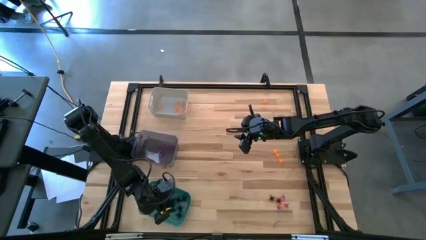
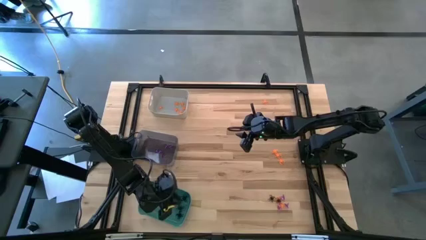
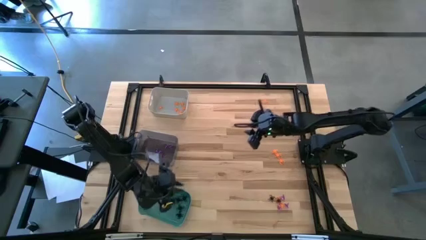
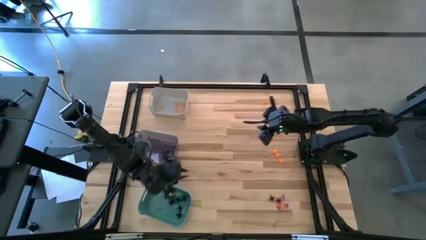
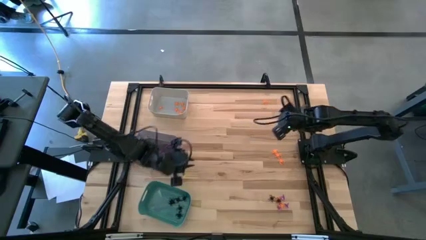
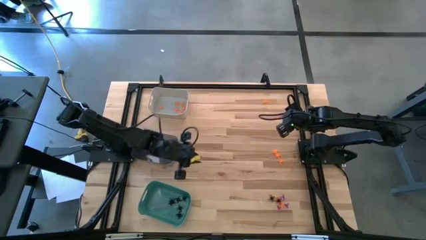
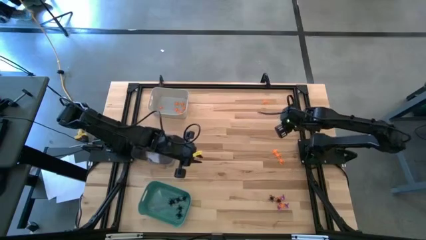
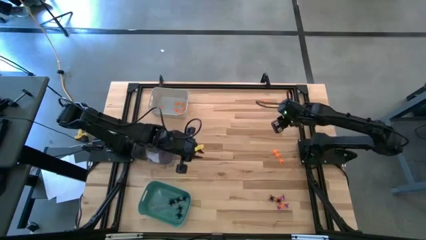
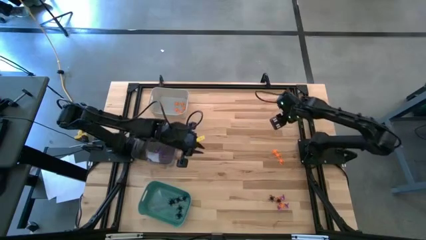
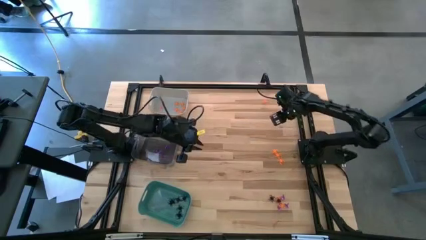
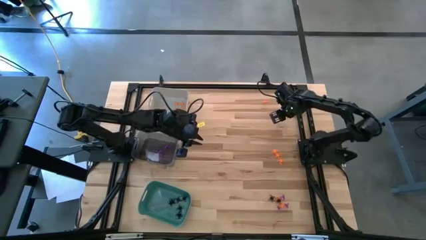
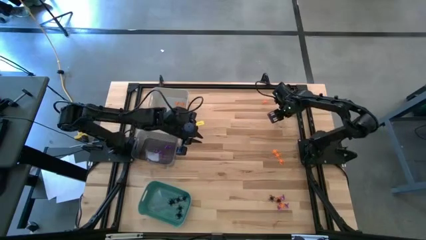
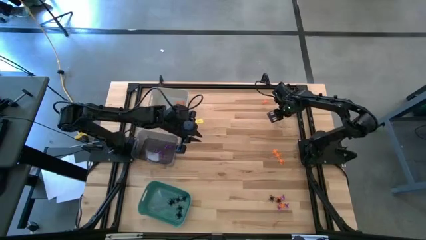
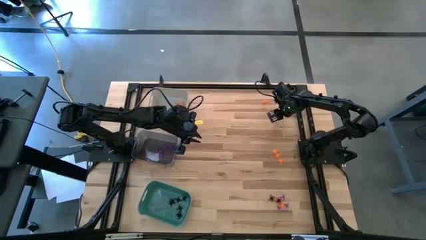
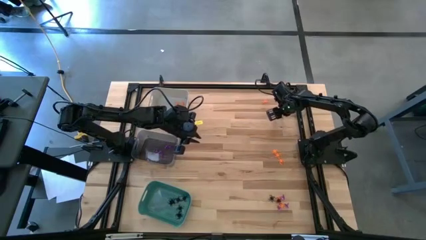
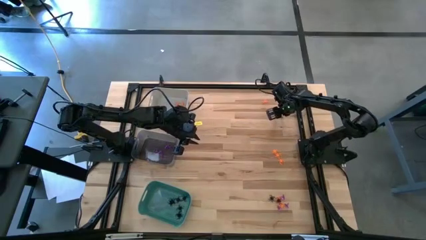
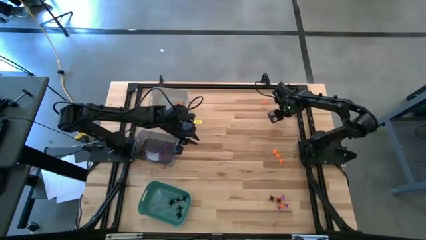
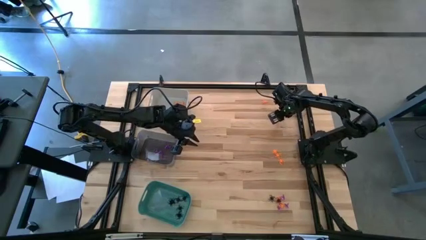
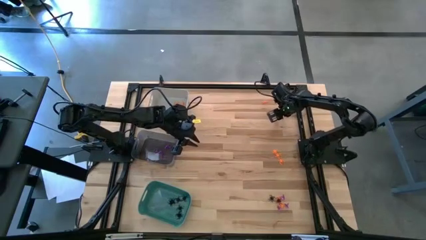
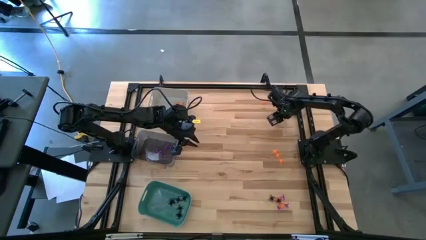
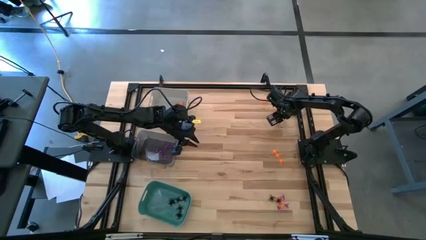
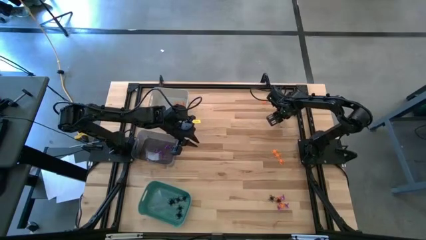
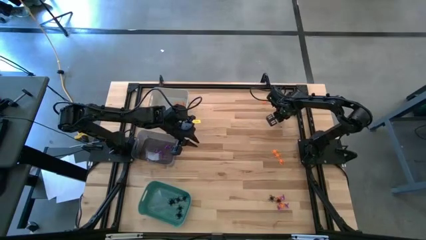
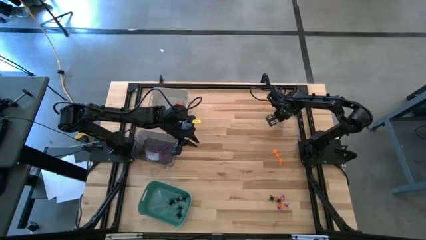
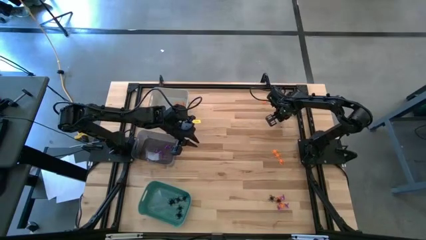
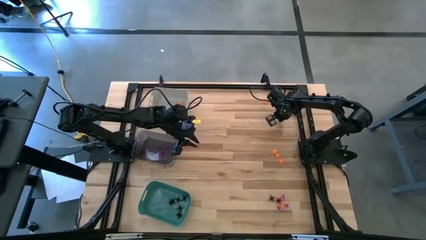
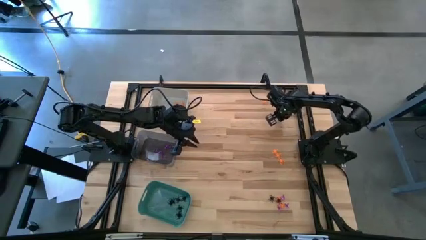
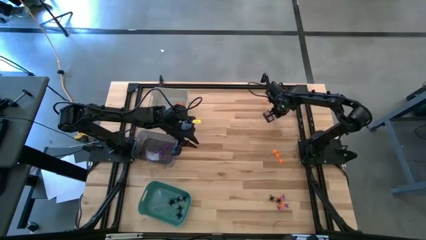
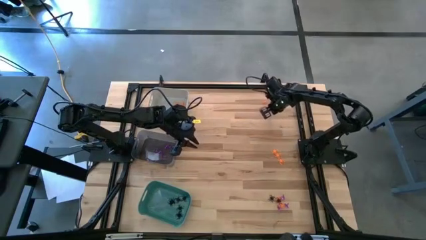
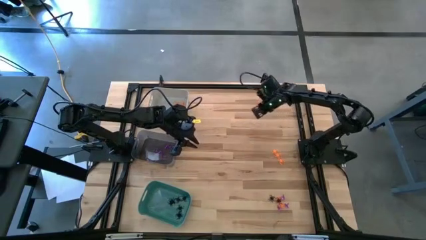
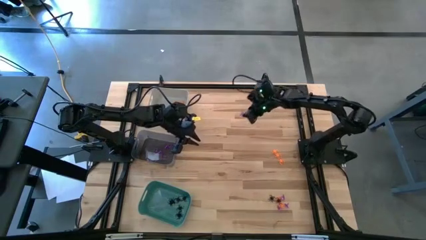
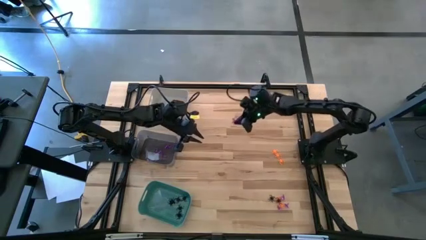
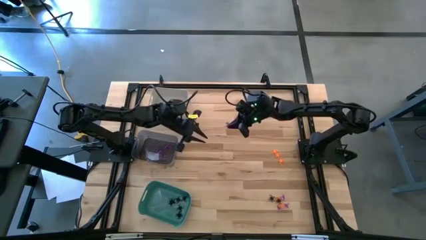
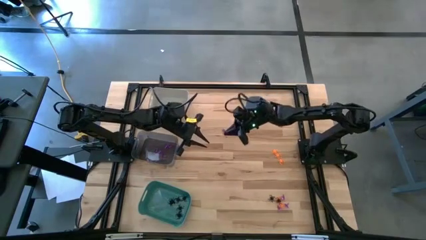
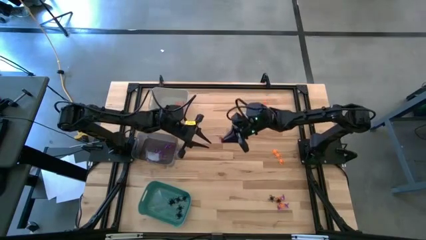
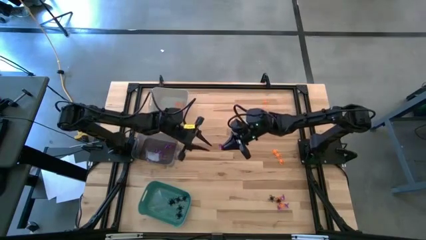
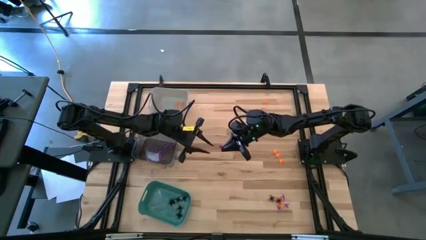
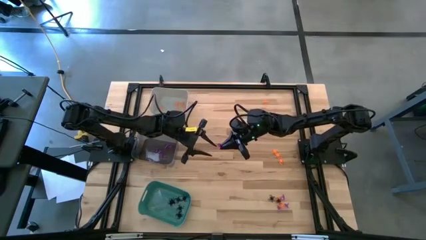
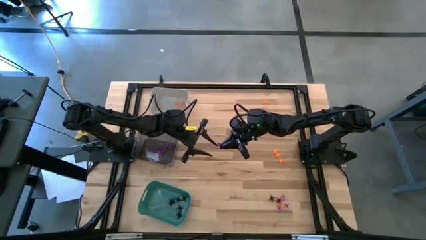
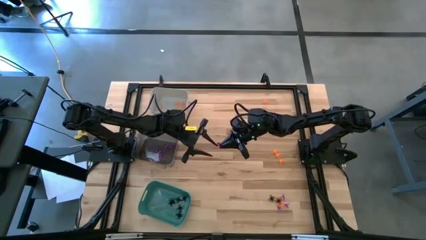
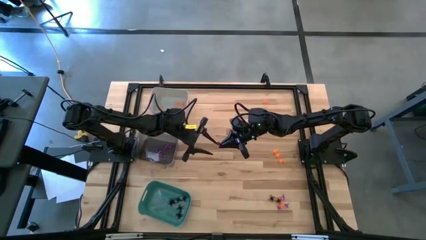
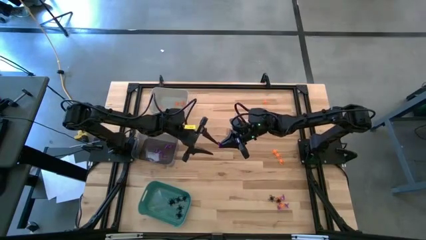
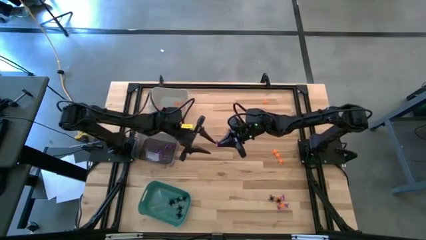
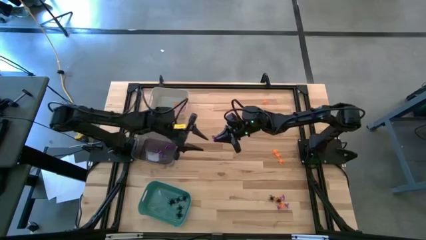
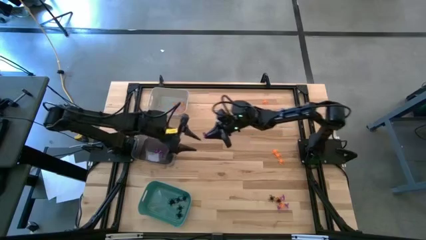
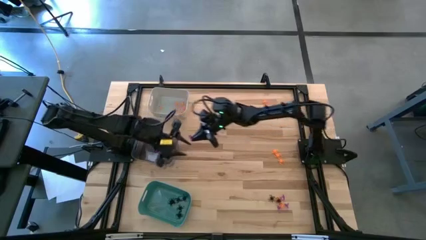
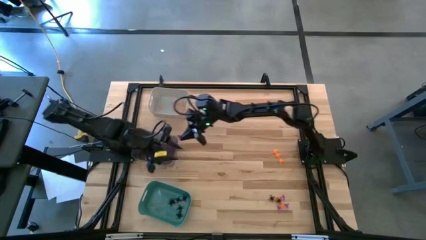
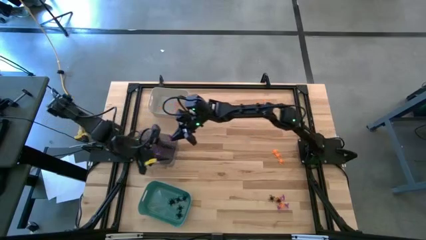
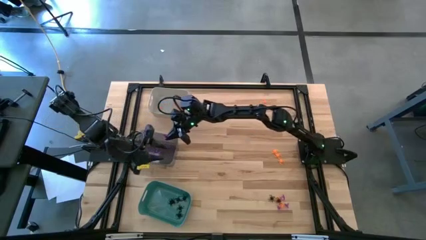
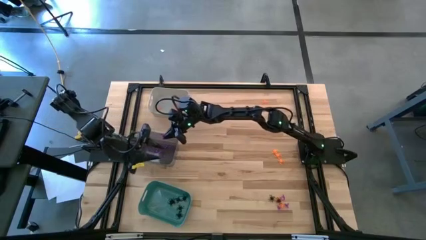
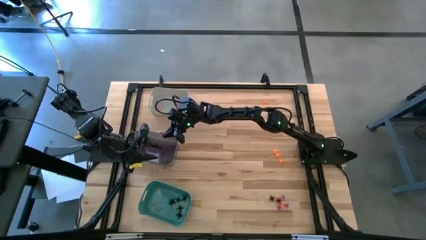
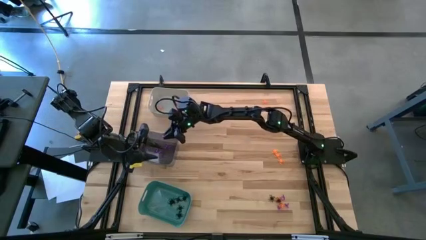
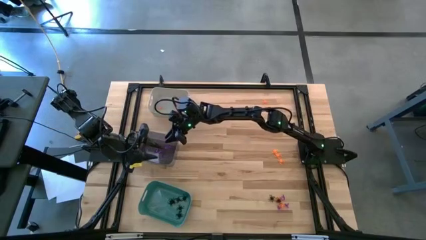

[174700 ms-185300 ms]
Task: Sort Halloween decoration
Put the top right violet witch hat into the black bin

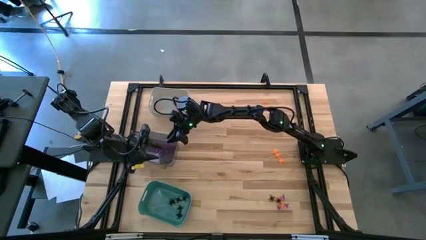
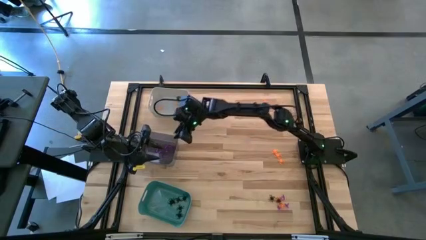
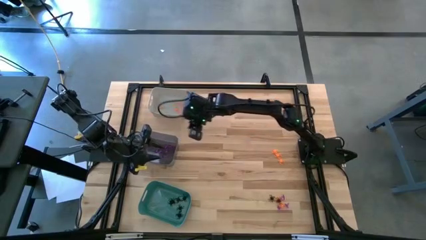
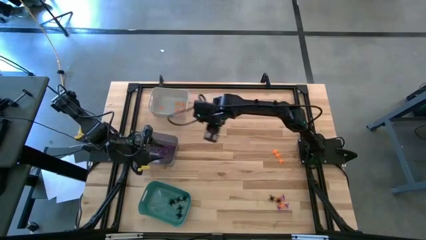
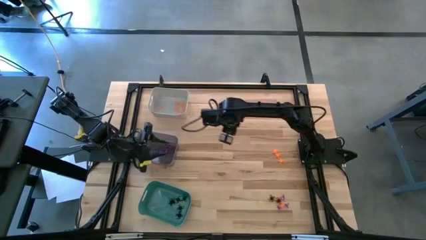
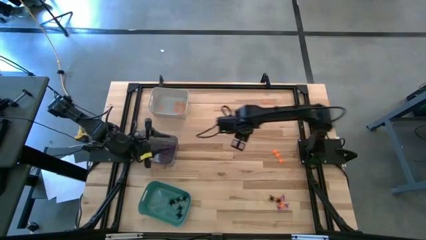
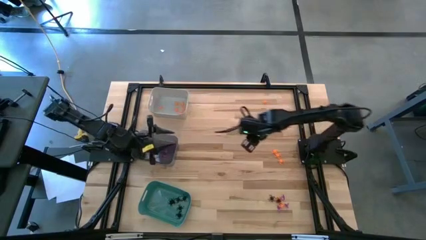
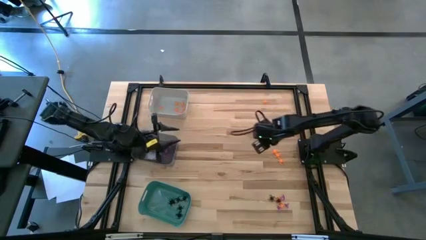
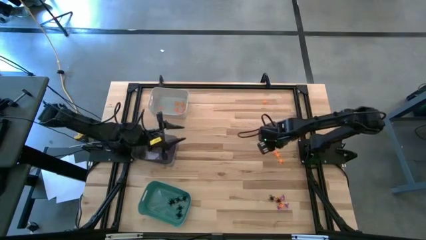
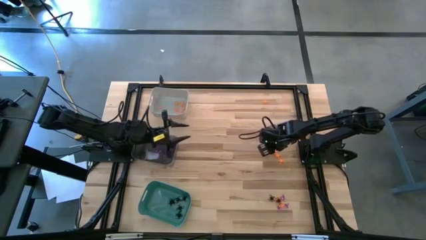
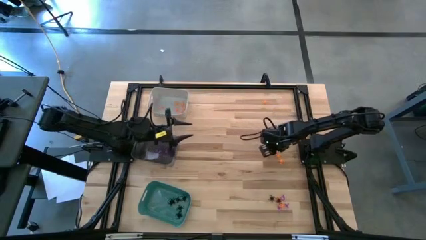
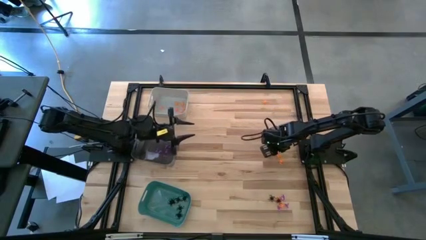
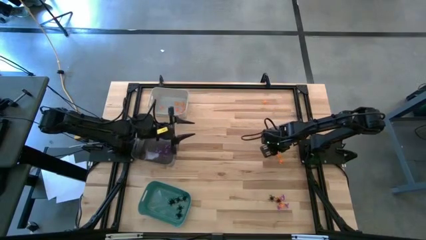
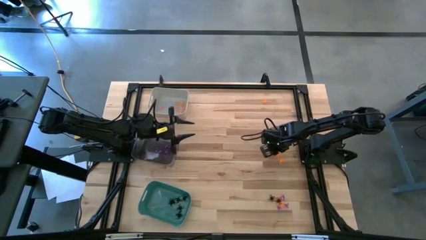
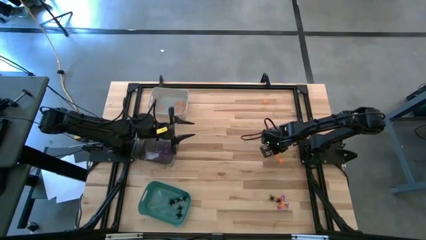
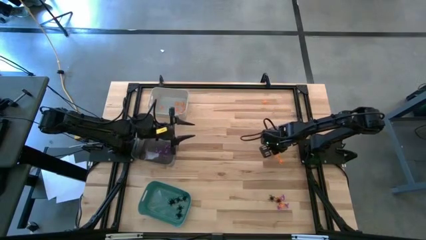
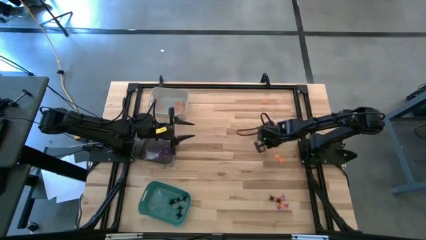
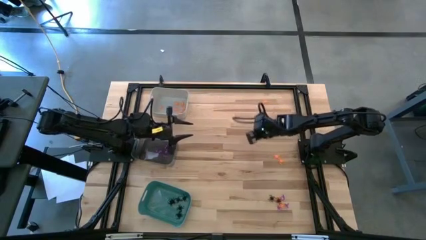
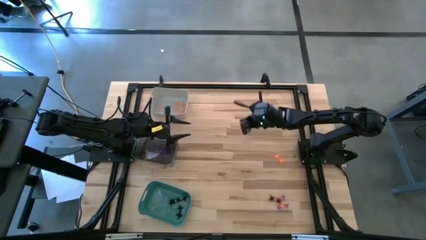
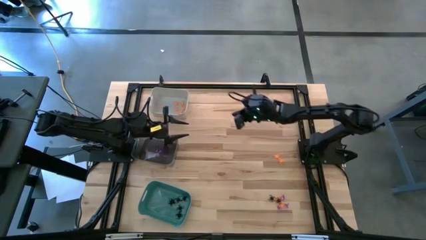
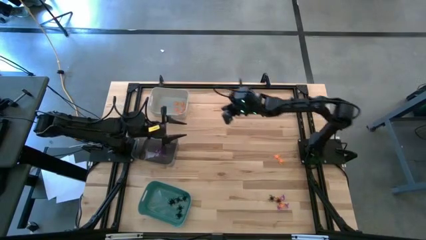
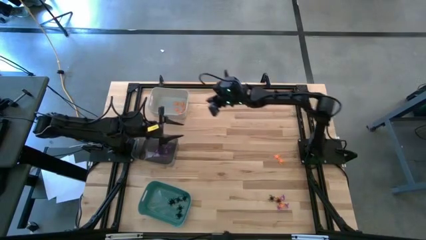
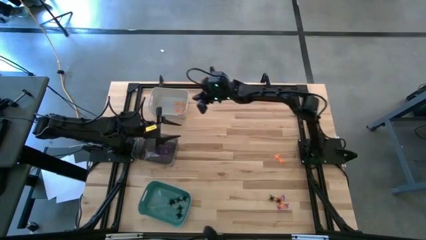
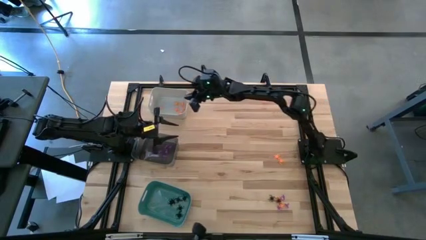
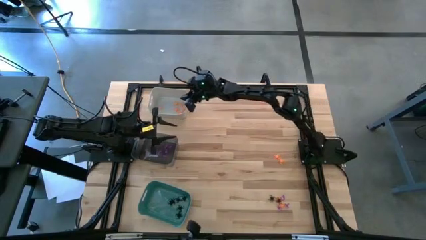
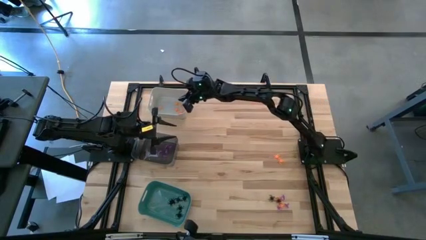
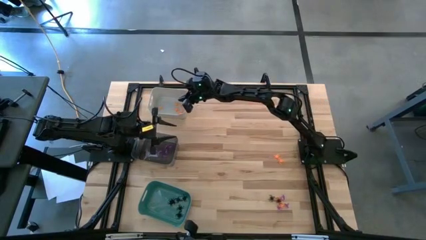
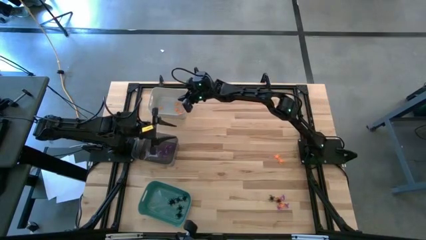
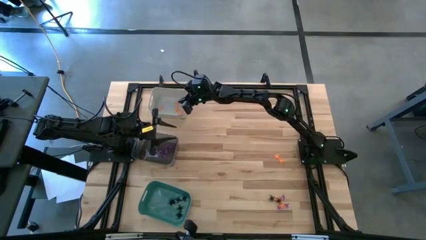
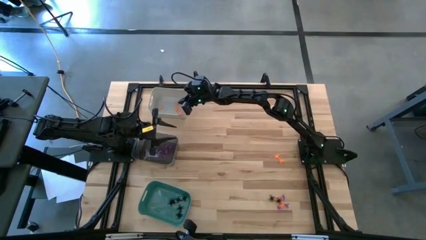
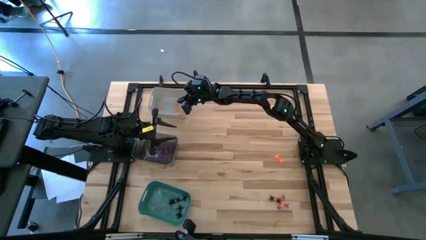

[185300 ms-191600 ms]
Put the middle right orange spider into the gray bin
